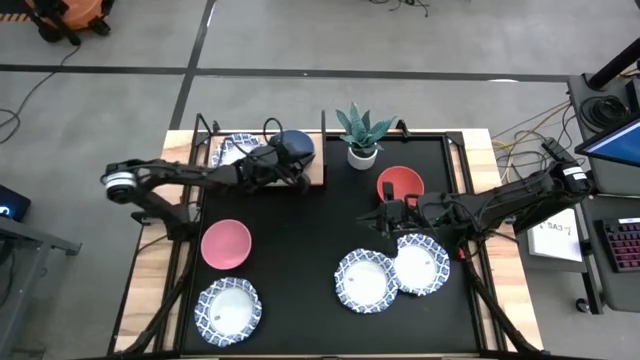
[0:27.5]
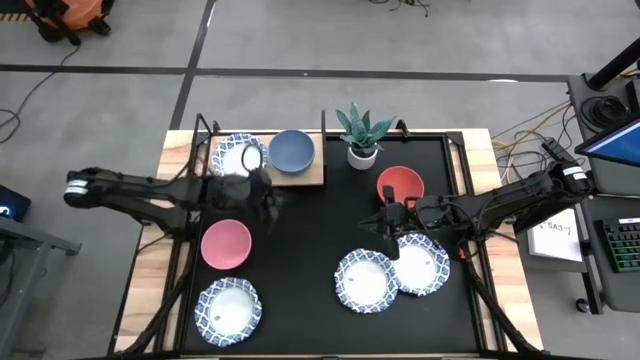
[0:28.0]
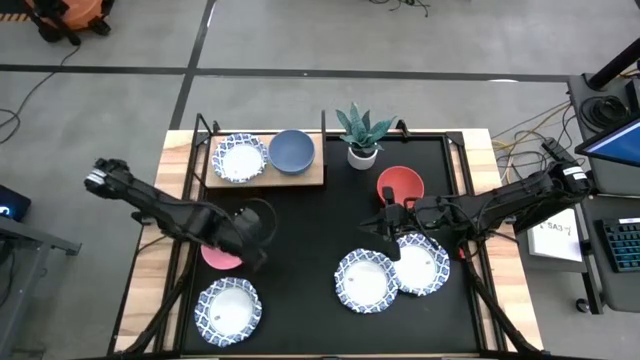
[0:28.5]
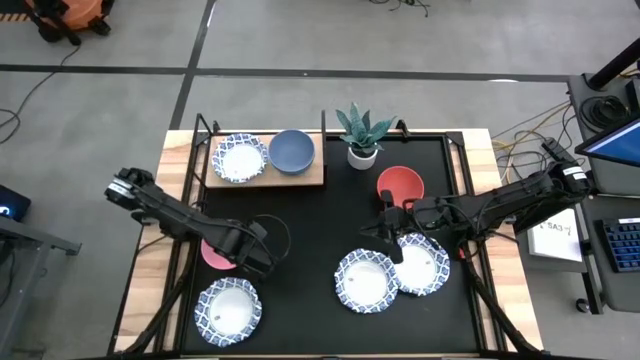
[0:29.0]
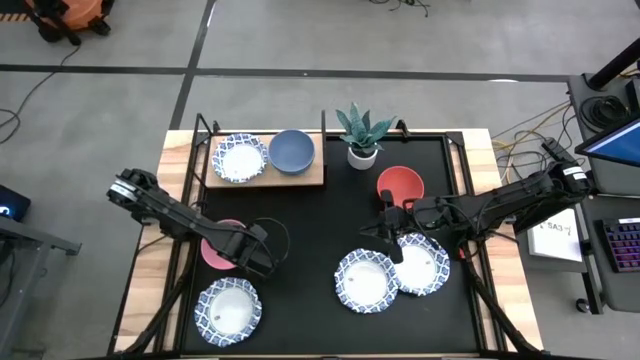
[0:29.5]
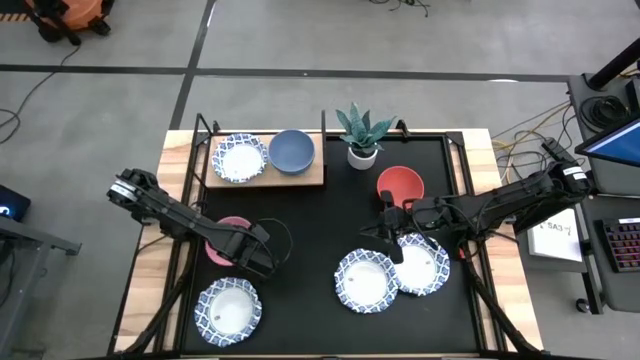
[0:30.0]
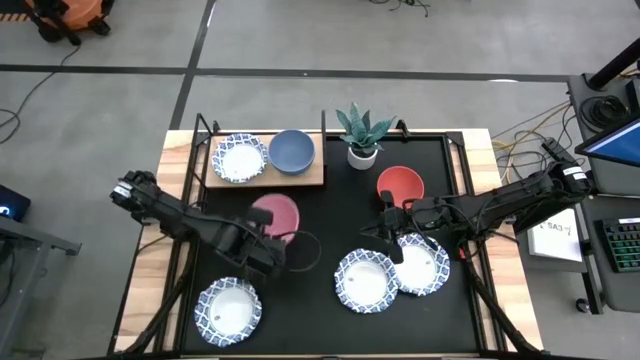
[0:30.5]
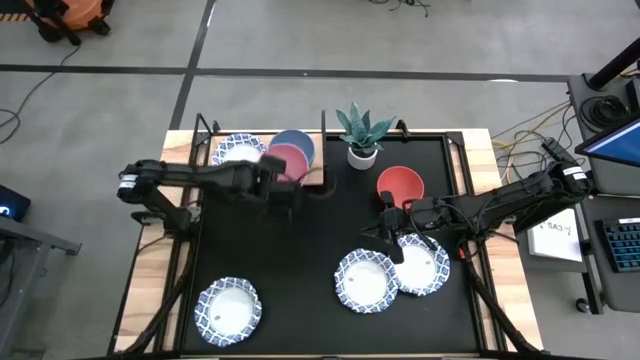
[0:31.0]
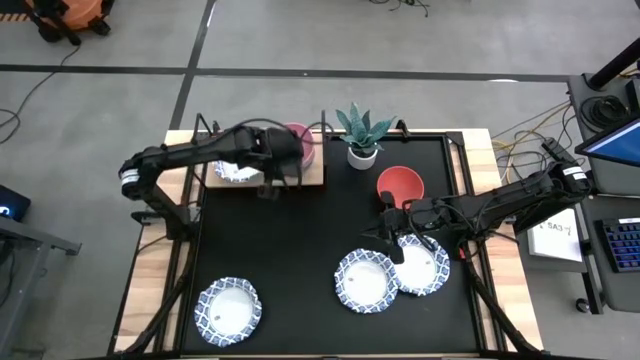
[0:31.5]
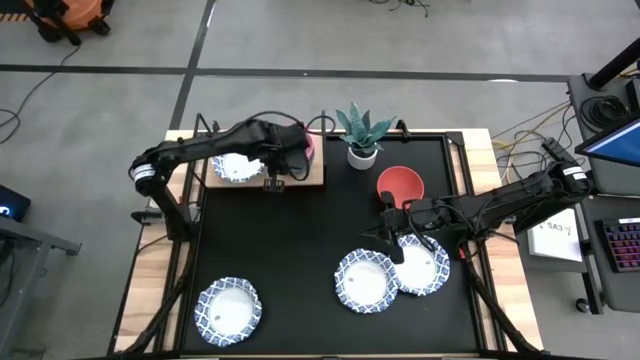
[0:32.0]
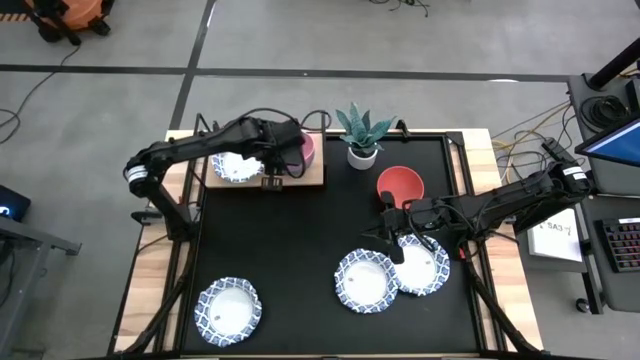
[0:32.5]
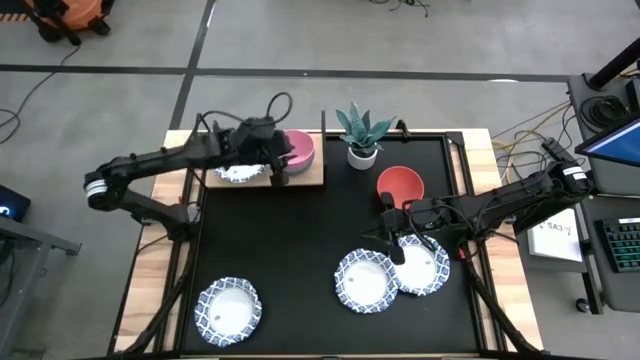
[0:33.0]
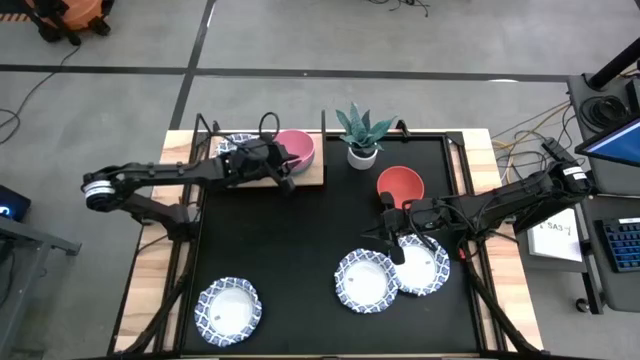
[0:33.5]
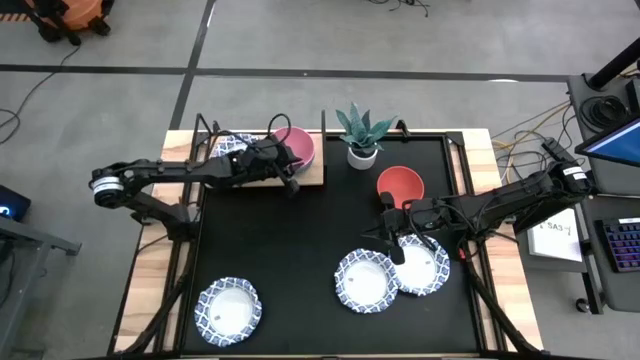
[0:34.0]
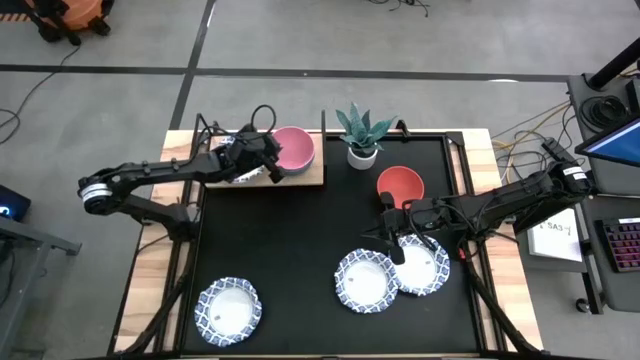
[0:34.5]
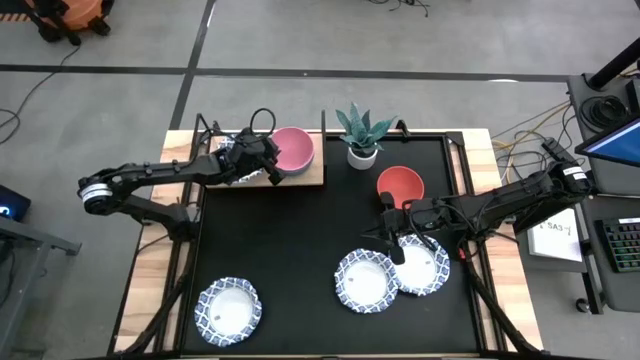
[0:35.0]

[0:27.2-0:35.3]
Task: Place and stack bowls onto a shelf
Stack the pink bowl on top of the blue bowl on the shelf

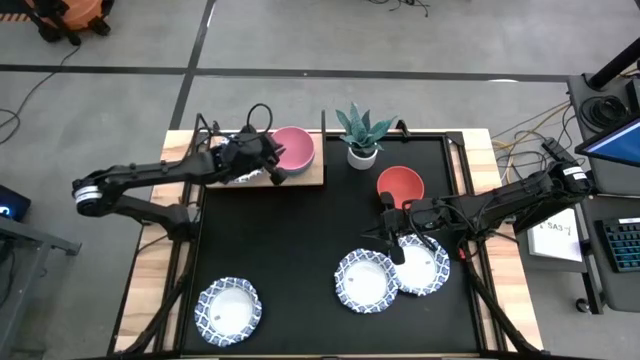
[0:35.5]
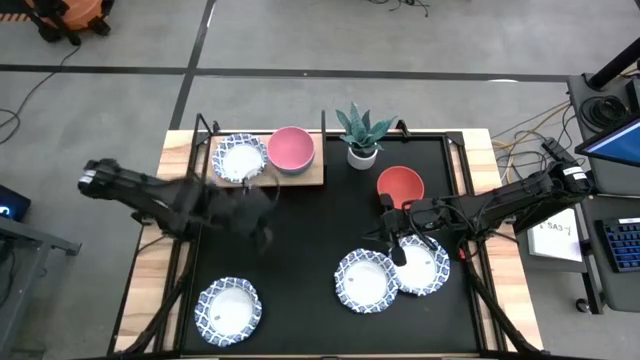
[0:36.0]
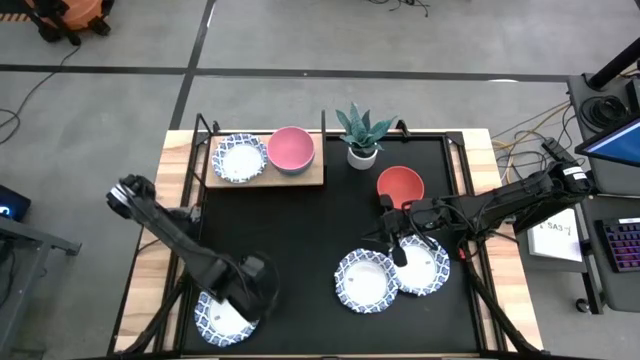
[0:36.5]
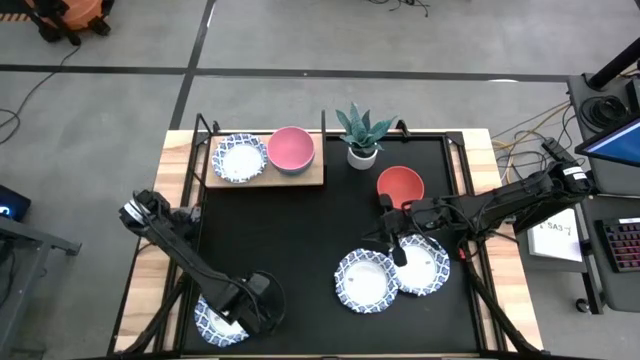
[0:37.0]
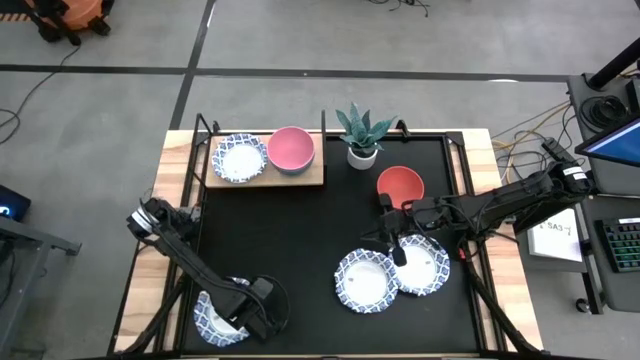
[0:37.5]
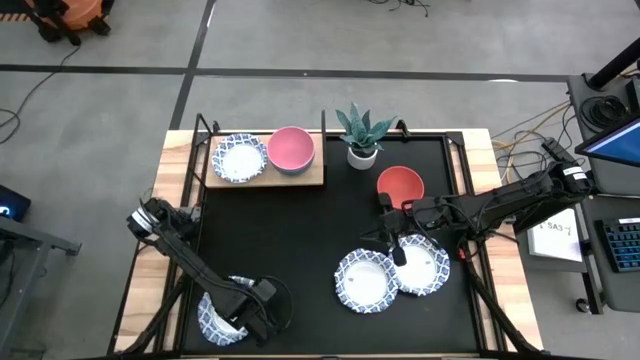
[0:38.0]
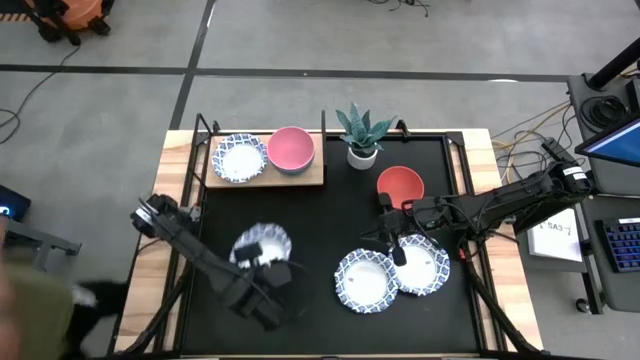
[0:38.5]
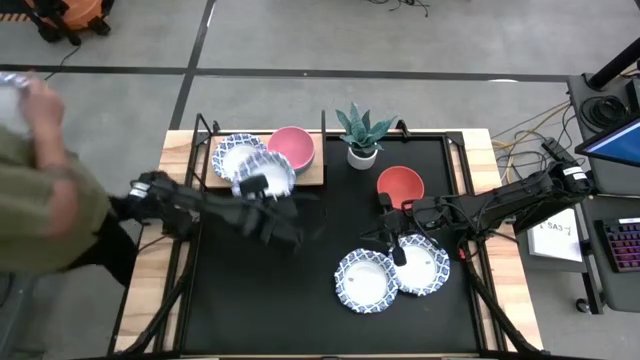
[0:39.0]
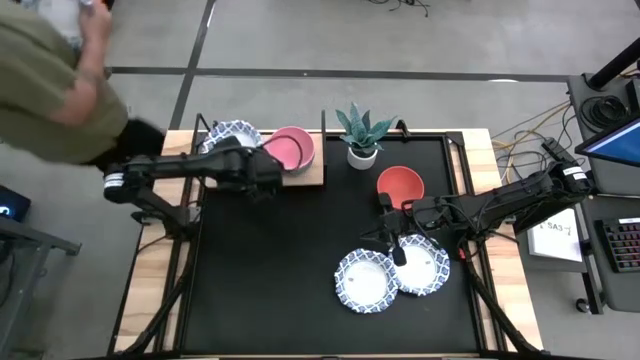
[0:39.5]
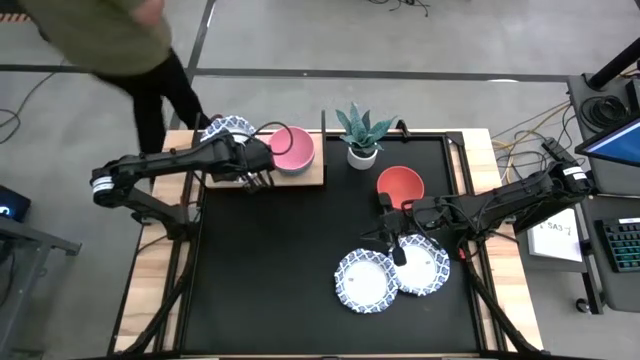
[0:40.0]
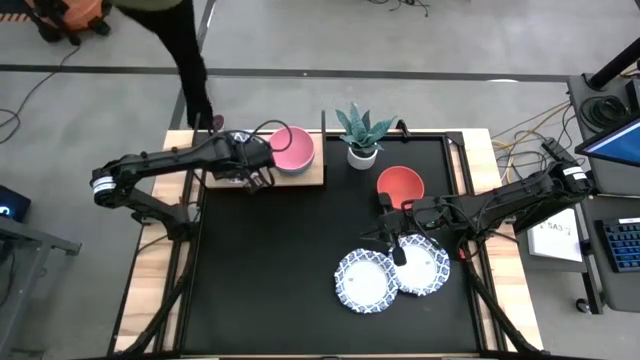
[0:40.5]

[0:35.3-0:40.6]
Stack the white patterned bowl on top of the other white patterned bowl on the shelf

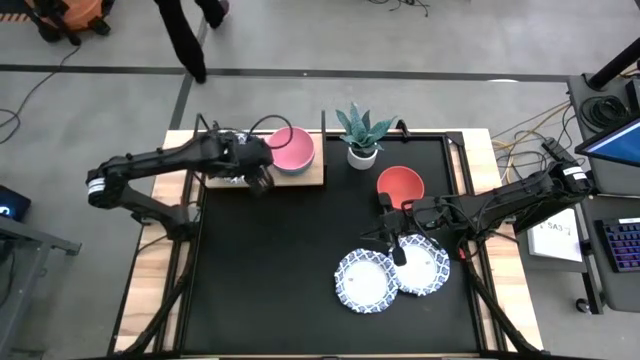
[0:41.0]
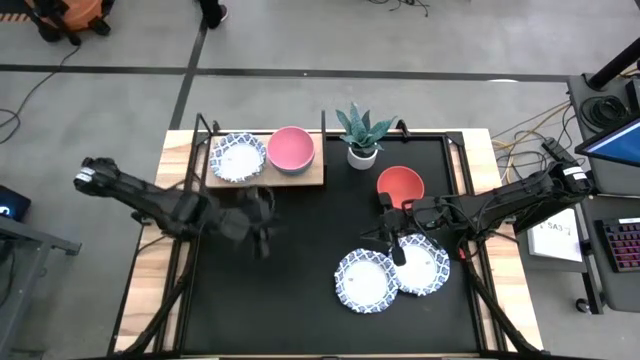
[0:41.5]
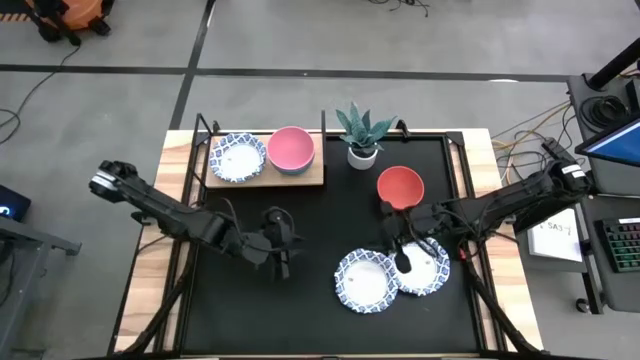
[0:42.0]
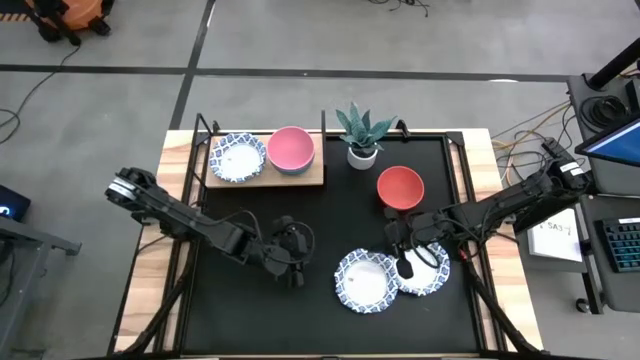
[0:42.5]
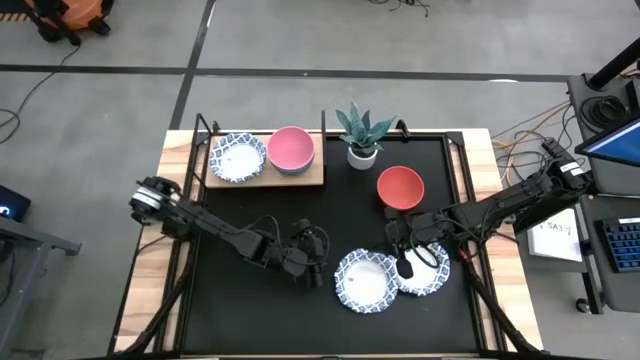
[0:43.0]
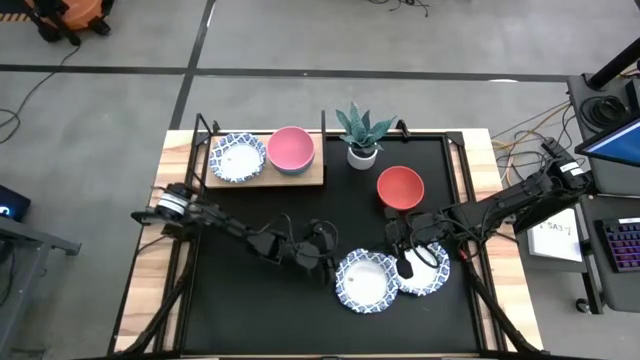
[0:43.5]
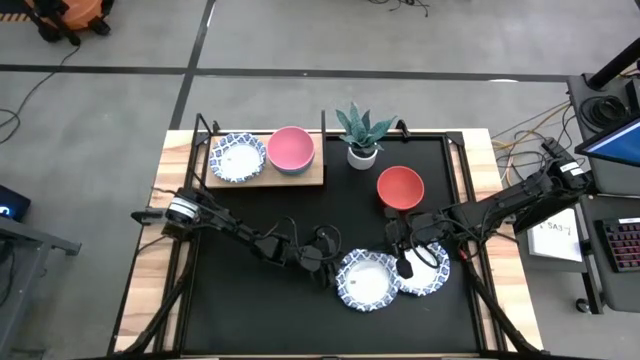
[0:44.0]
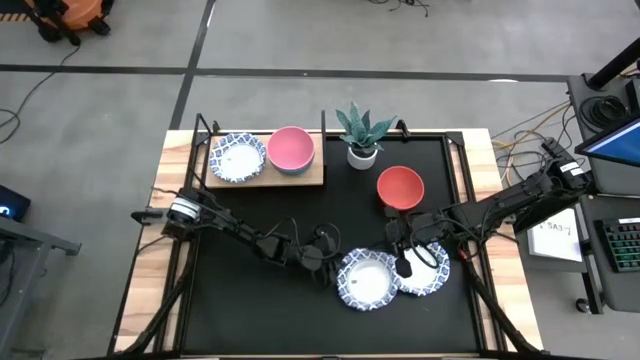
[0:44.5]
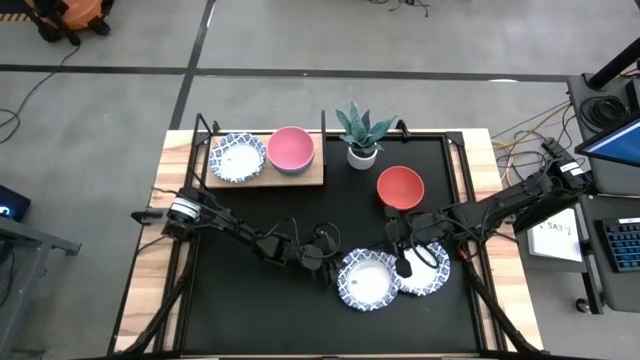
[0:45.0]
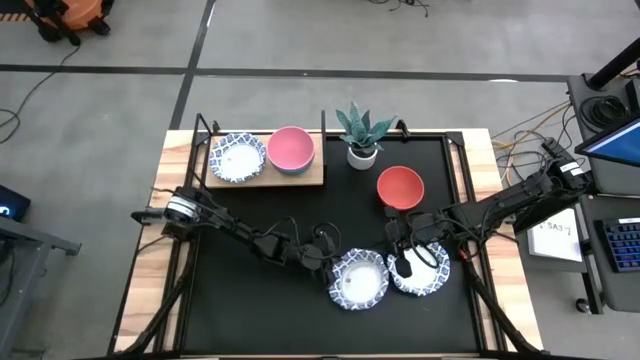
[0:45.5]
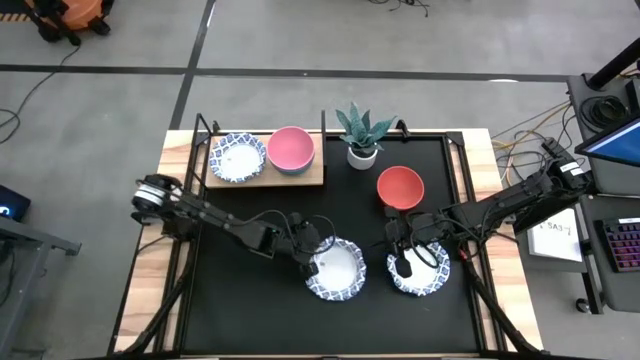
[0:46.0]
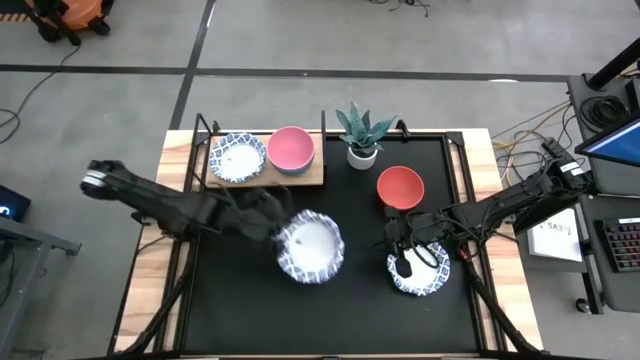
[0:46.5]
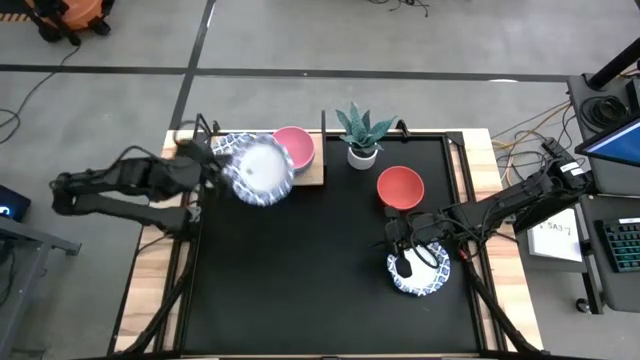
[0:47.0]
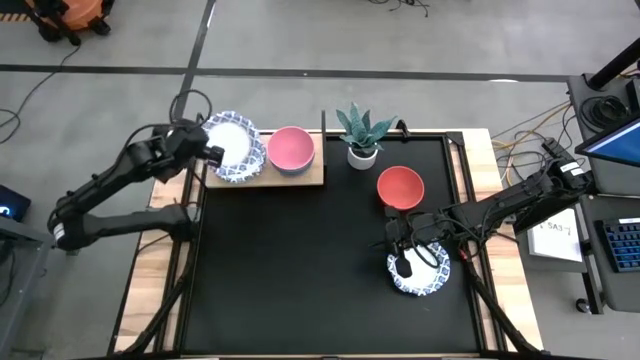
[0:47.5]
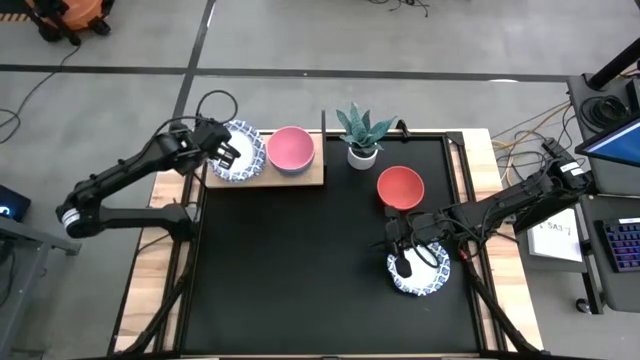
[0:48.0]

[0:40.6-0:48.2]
Stack the white patterned bowl on top of the other white patterned bowl on the shelf

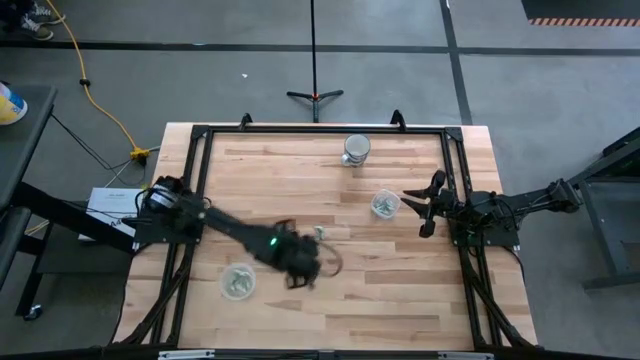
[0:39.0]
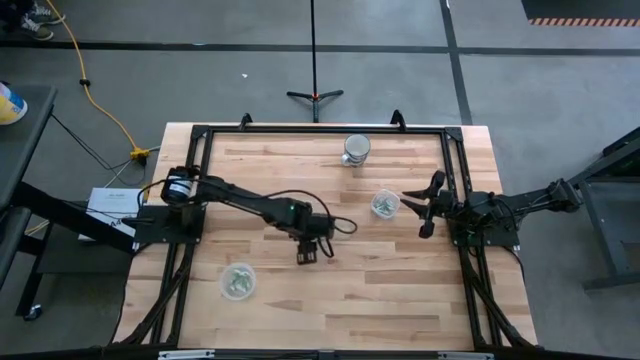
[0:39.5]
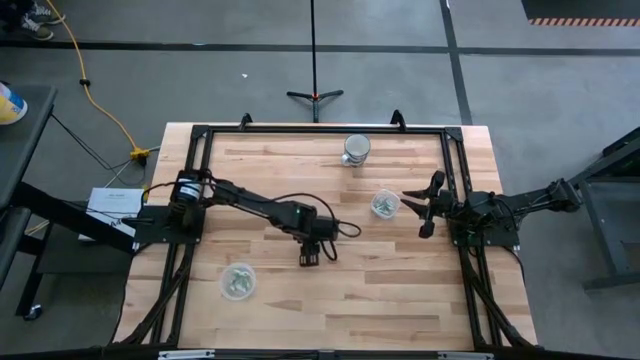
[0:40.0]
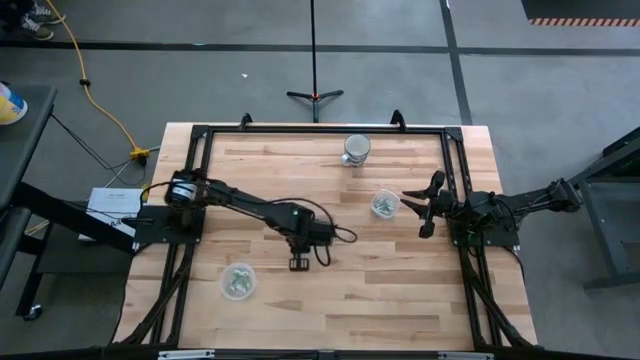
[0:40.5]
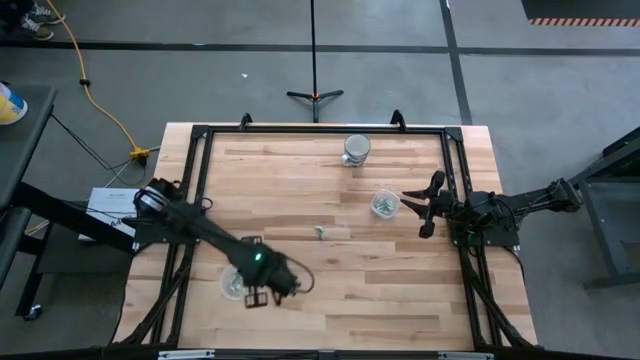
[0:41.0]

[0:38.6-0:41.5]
Task: Pick and place Stevia / Truvia into bins
Put the stevia packet into the round transparent container
